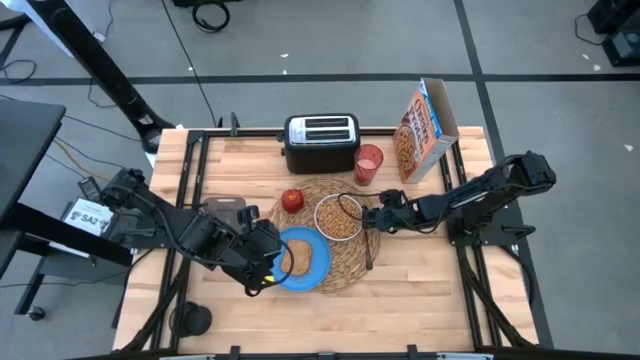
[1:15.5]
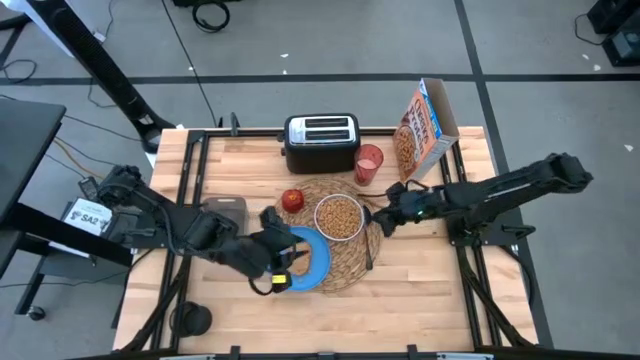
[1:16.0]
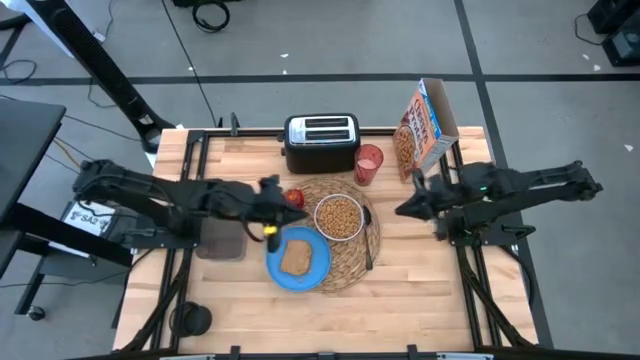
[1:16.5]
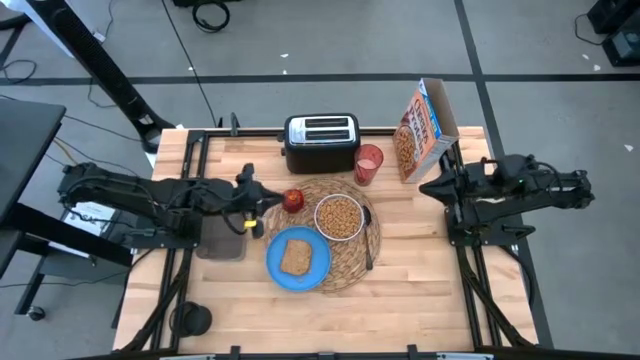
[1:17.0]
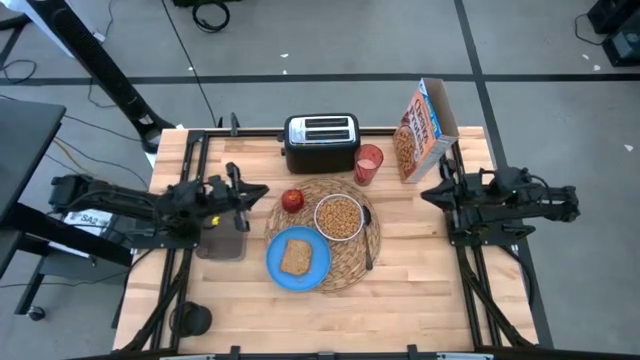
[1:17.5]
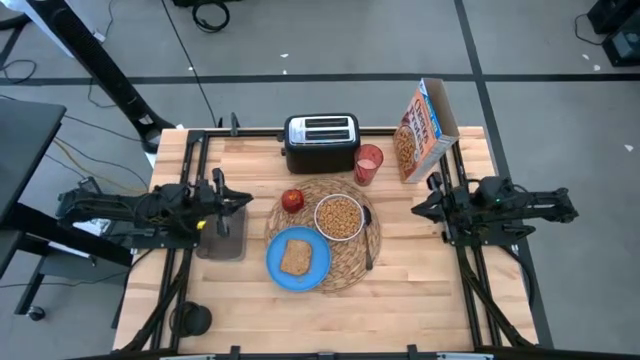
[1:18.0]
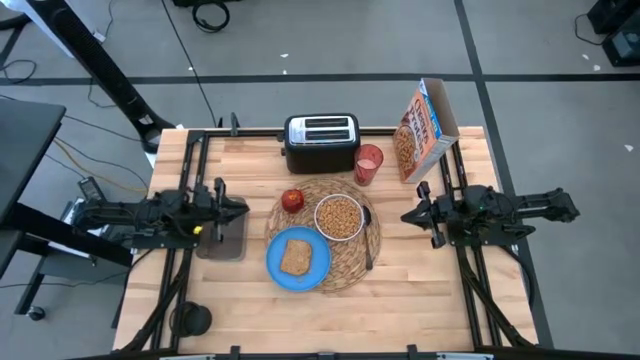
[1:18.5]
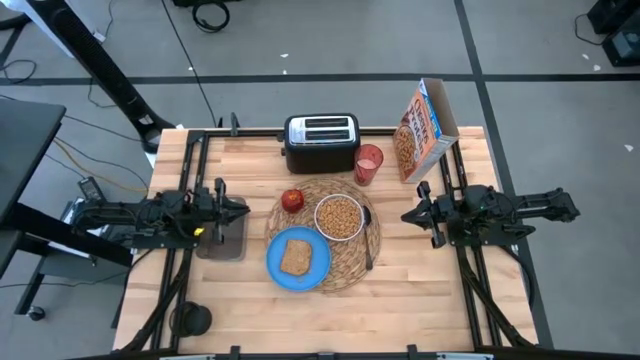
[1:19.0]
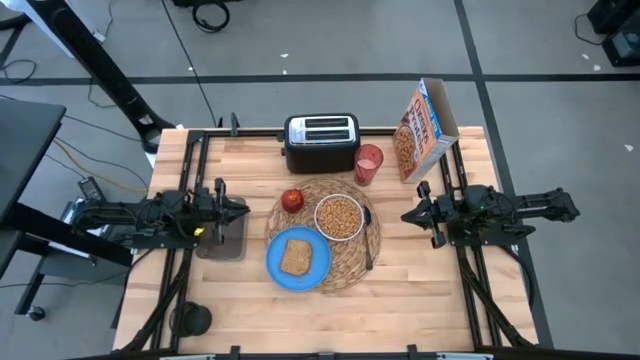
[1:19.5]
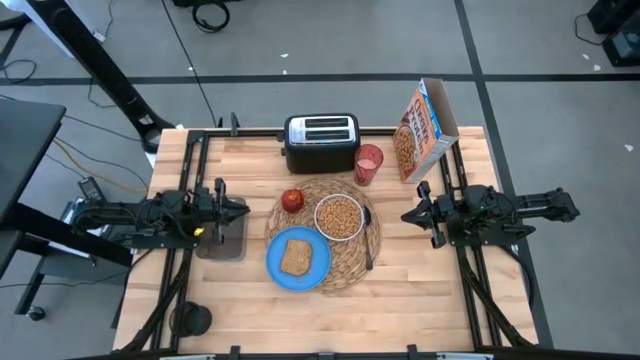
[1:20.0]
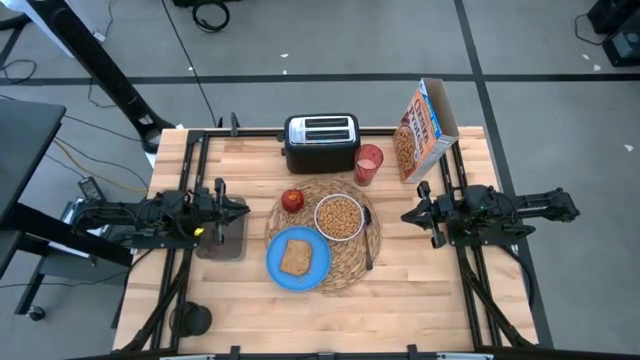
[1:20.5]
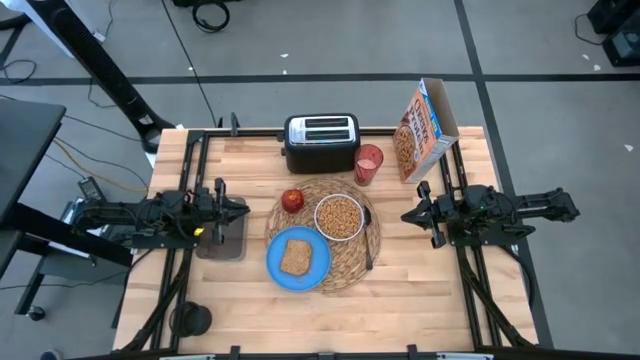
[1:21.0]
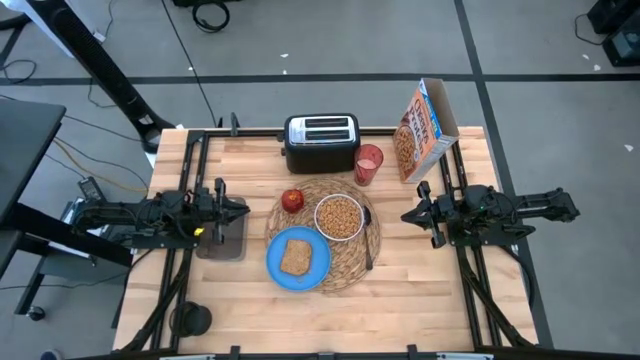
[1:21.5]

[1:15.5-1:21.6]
Task: Arrange a breakfast setting
Return to Home Position

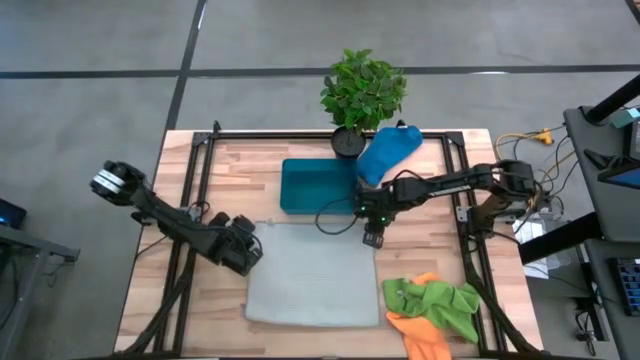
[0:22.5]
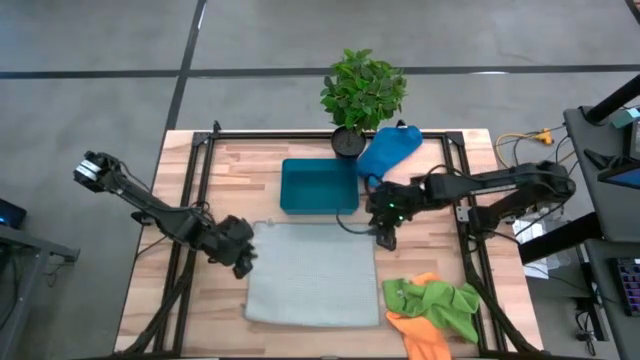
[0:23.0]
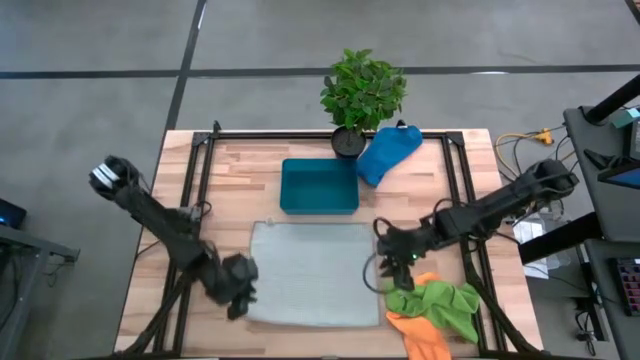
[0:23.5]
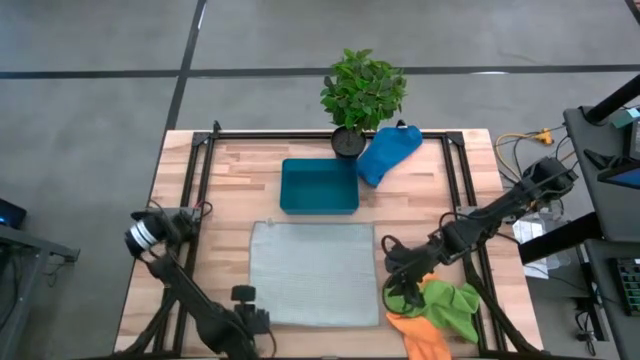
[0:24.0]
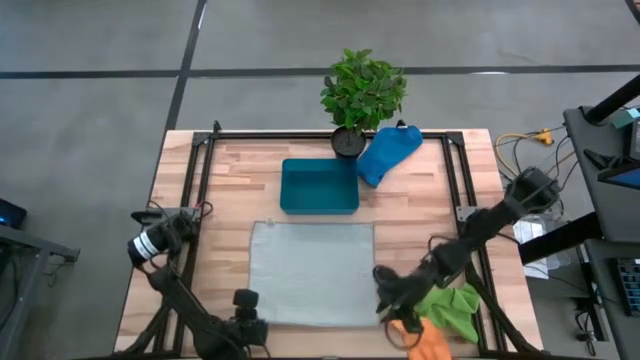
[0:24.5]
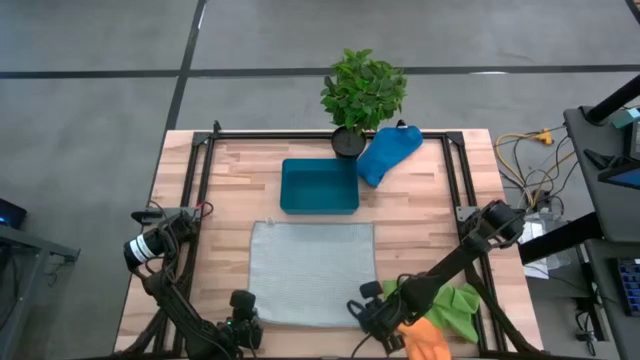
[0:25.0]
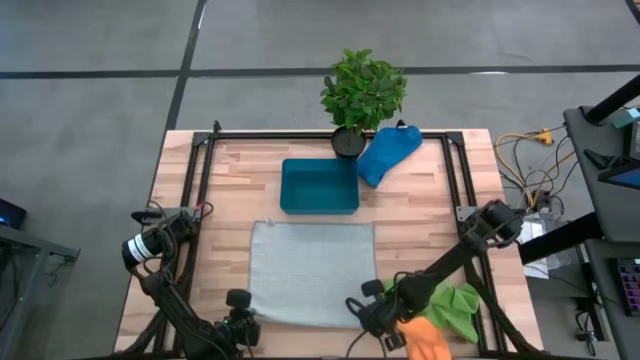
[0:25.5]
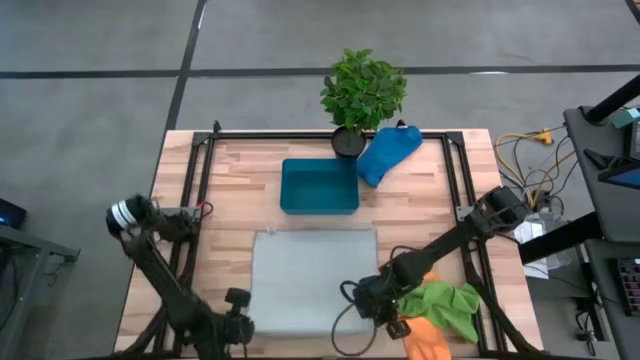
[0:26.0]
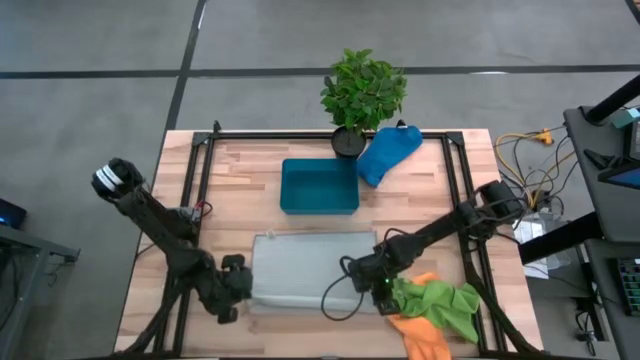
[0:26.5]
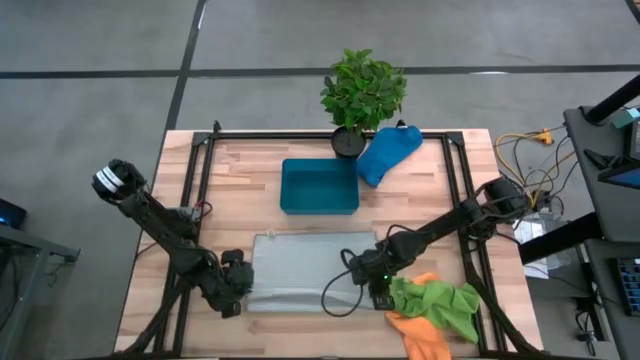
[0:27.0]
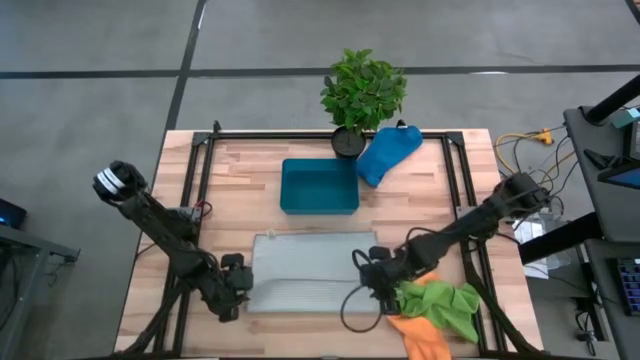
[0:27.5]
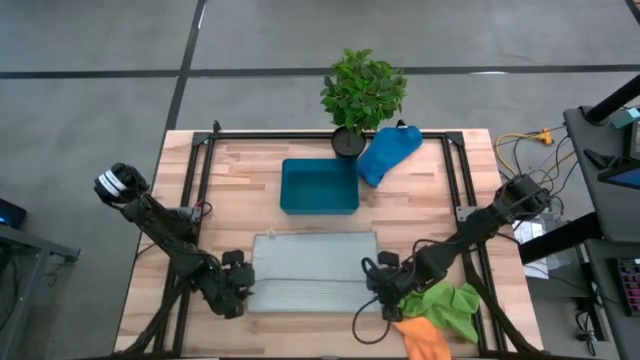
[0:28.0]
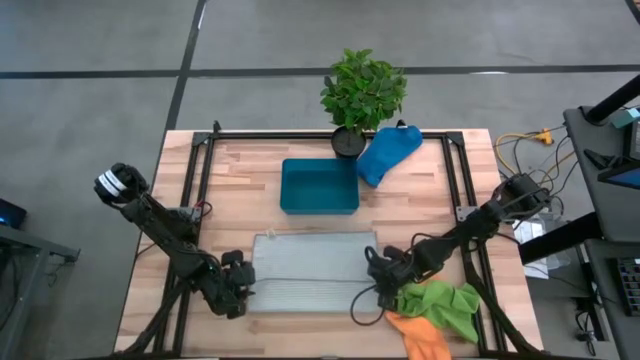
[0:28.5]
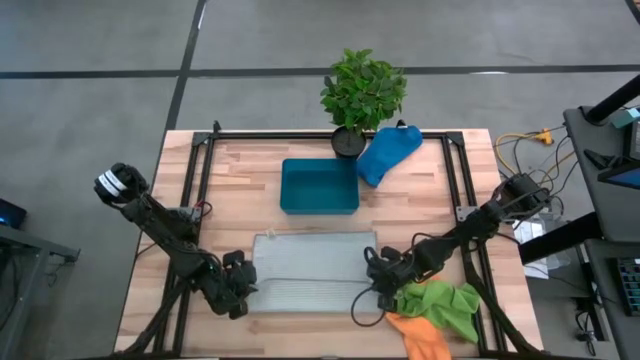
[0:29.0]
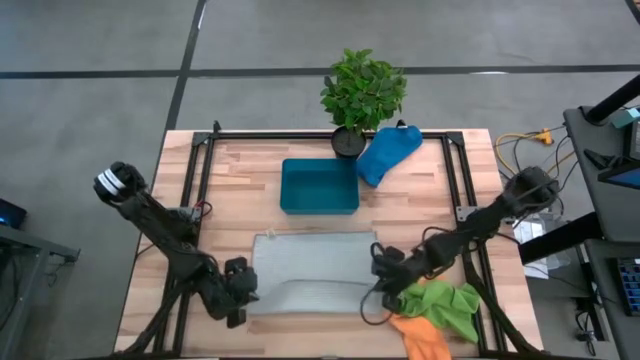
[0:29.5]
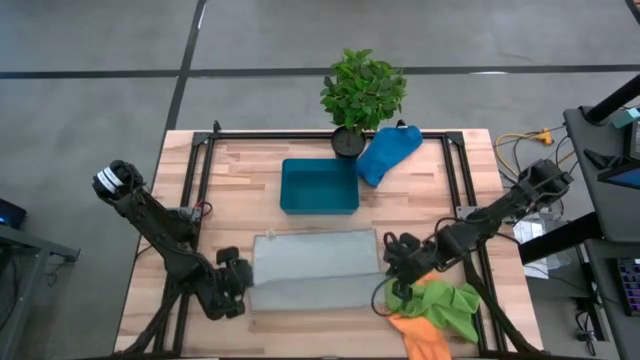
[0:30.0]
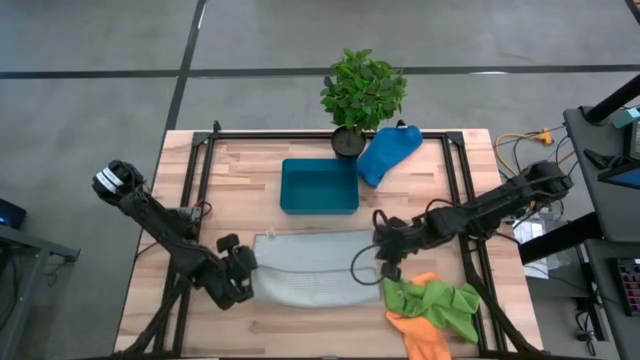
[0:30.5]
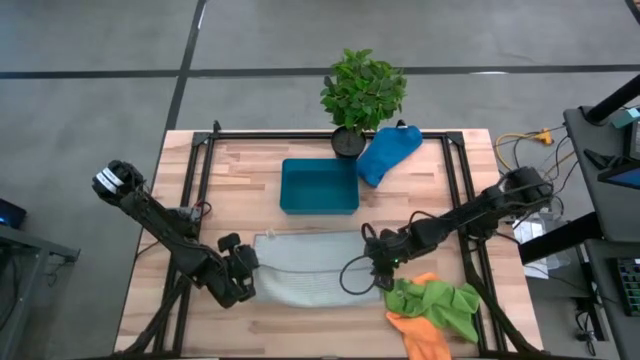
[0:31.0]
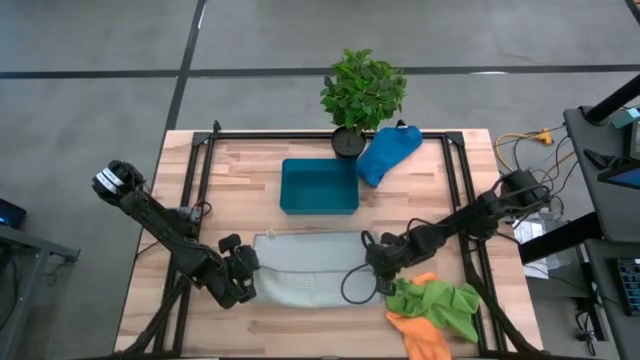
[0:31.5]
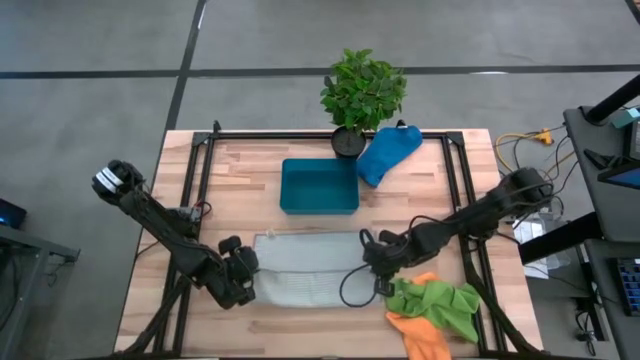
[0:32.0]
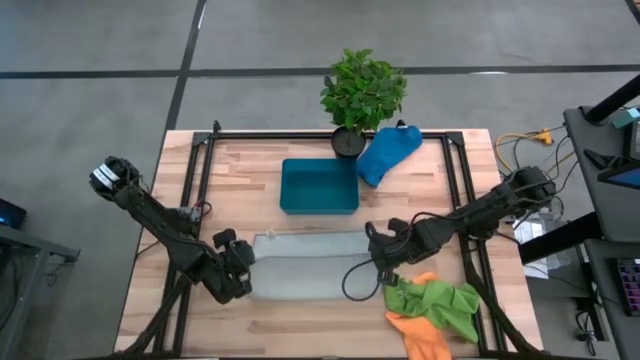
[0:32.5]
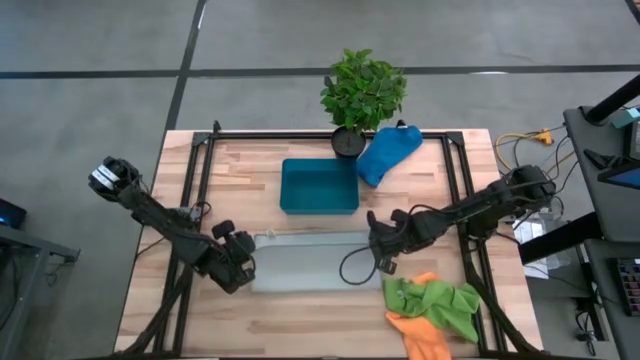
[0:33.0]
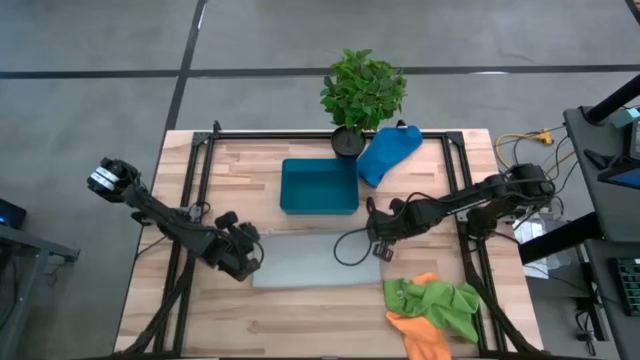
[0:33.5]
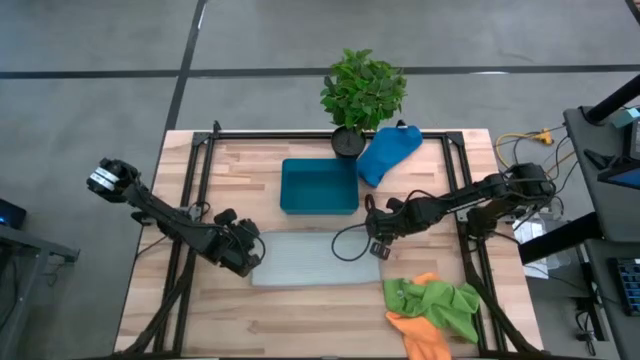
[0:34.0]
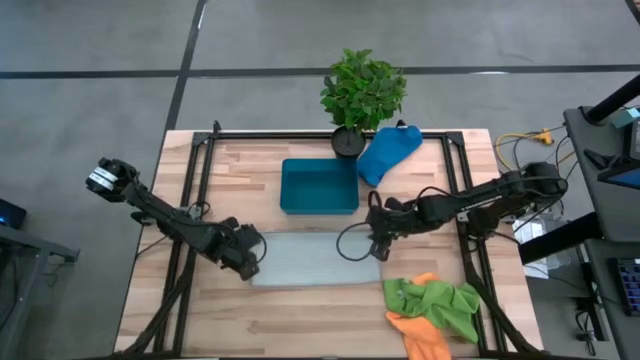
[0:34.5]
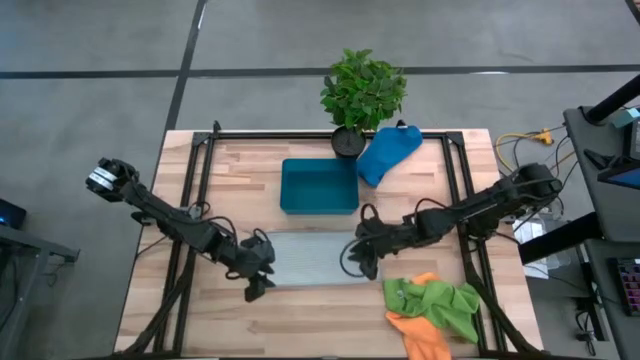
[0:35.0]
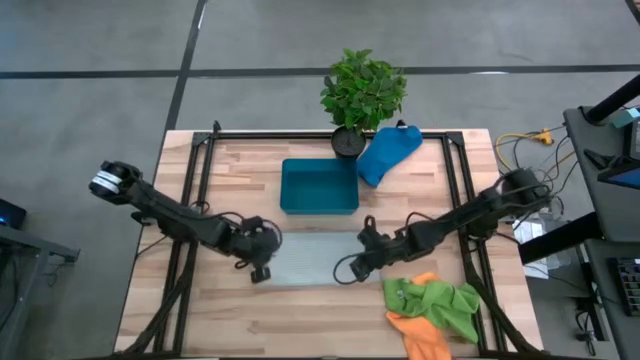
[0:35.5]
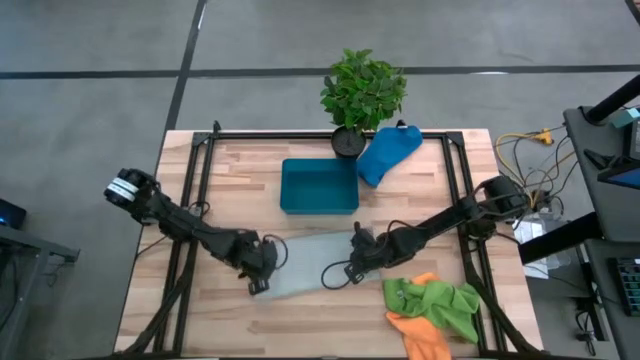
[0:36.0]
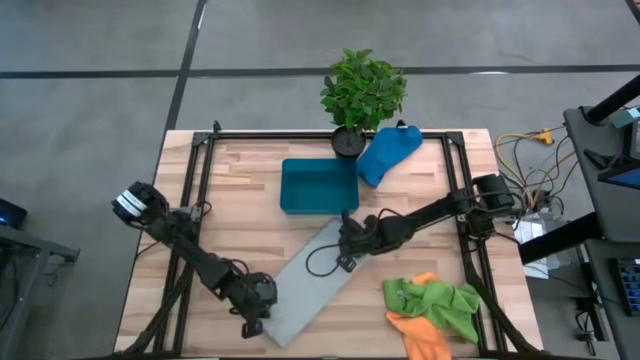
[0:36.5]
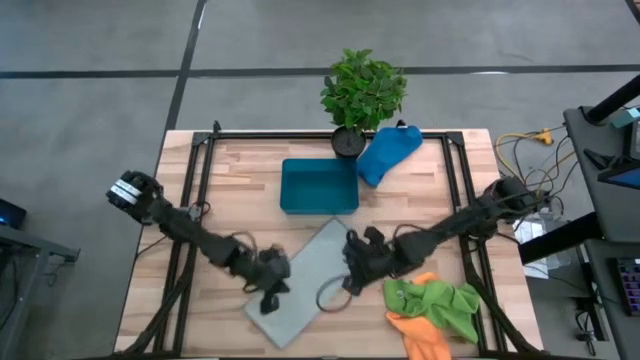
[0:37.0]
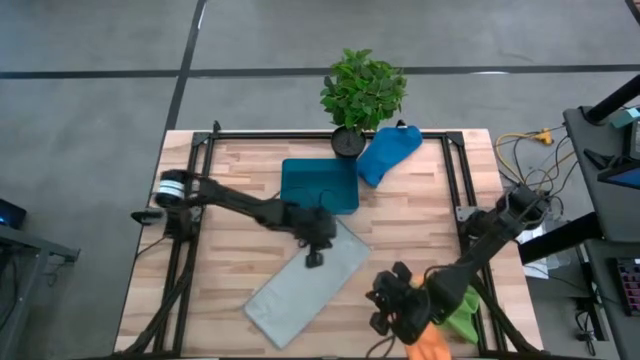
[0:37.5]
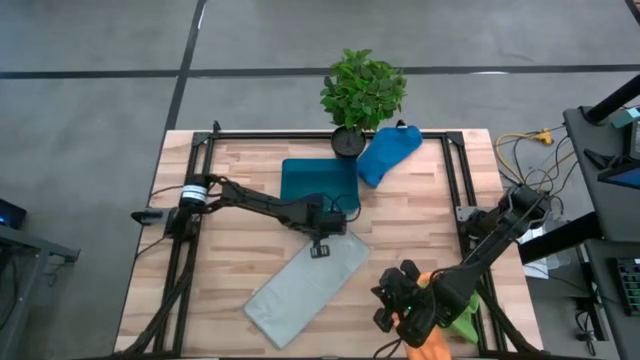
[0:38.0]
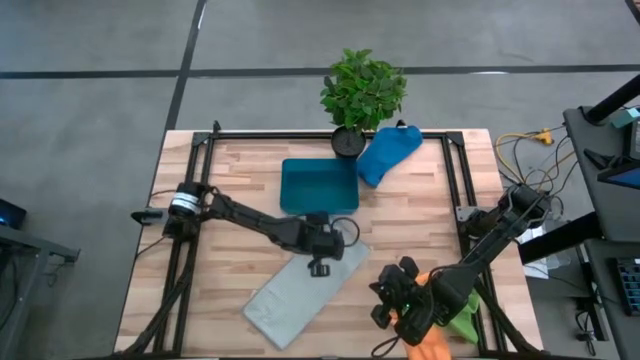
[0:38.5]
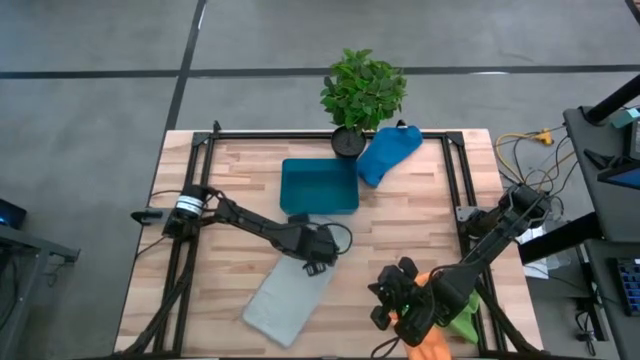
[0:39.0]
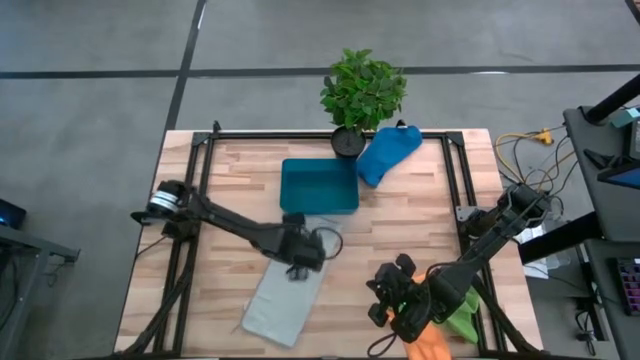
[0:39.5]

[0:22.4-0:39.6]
Task: Fold microfiber towels
Fold the gray microfiber towel
